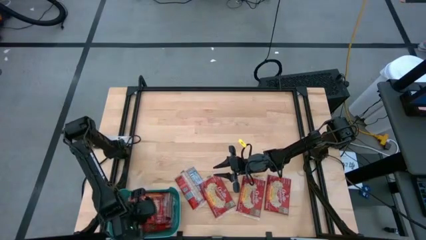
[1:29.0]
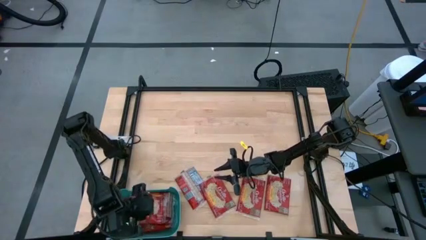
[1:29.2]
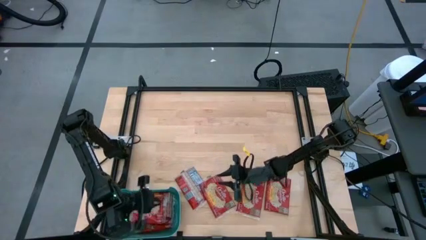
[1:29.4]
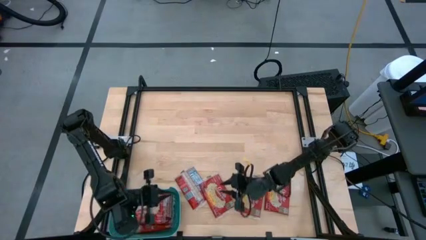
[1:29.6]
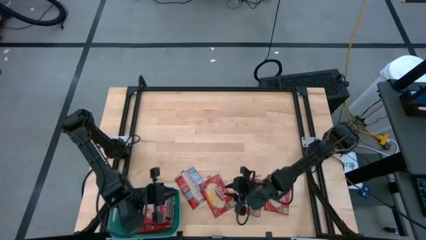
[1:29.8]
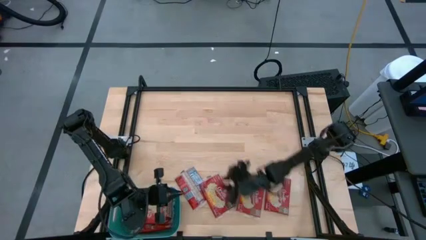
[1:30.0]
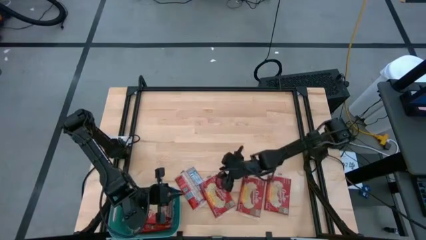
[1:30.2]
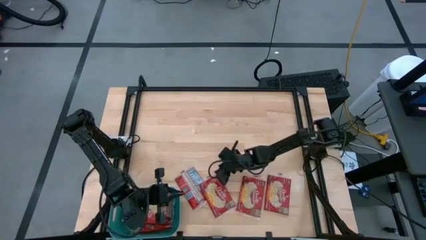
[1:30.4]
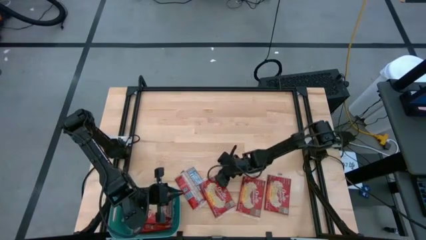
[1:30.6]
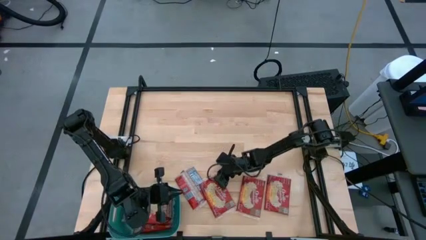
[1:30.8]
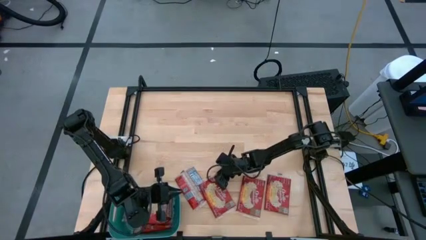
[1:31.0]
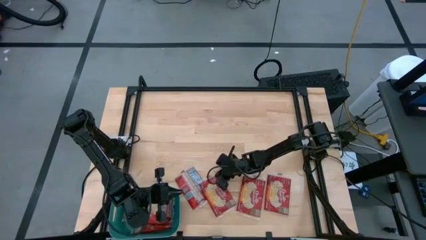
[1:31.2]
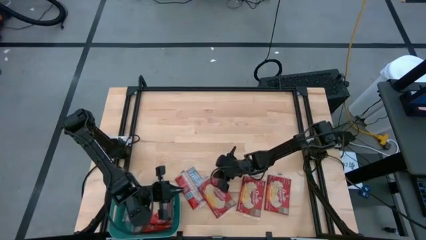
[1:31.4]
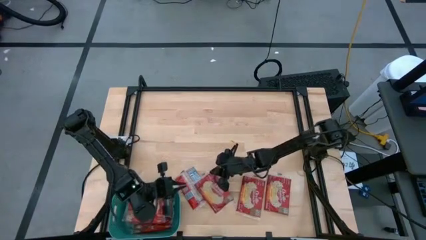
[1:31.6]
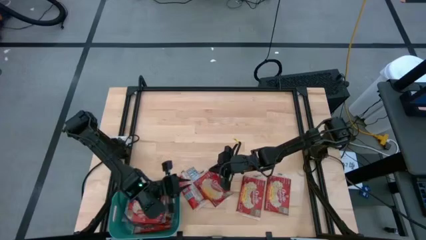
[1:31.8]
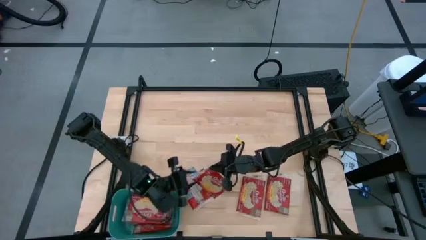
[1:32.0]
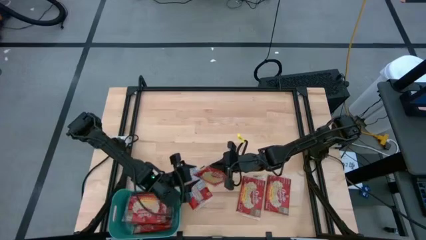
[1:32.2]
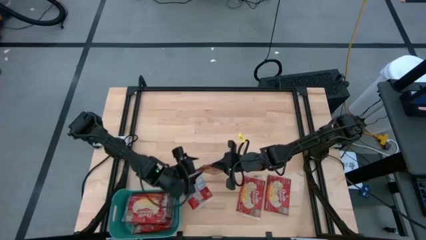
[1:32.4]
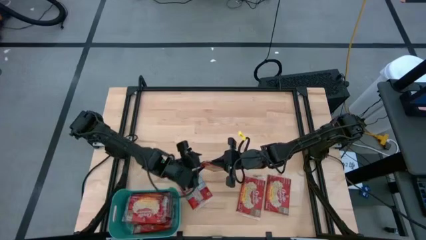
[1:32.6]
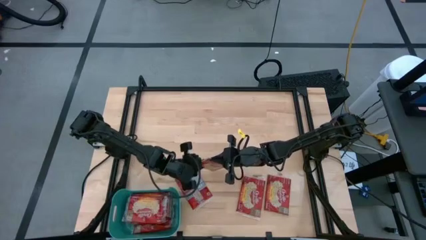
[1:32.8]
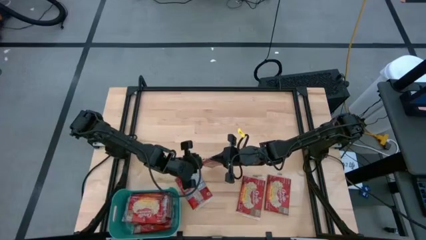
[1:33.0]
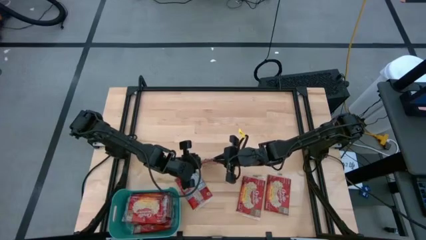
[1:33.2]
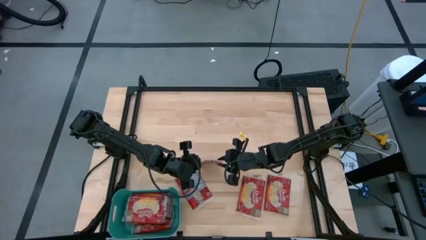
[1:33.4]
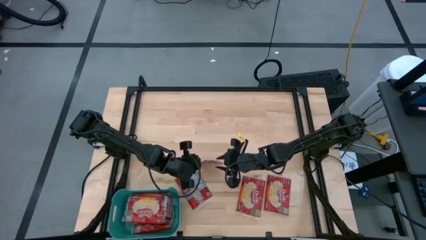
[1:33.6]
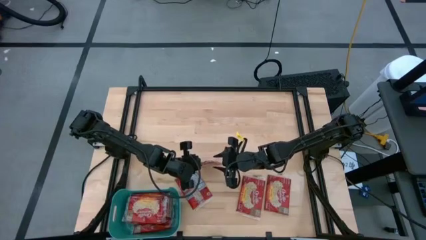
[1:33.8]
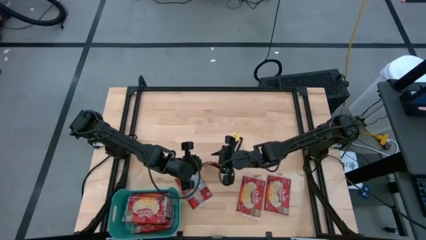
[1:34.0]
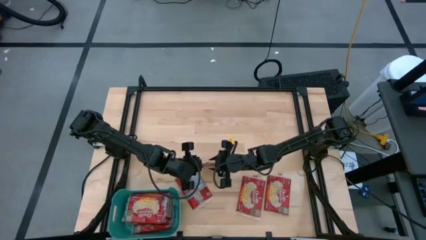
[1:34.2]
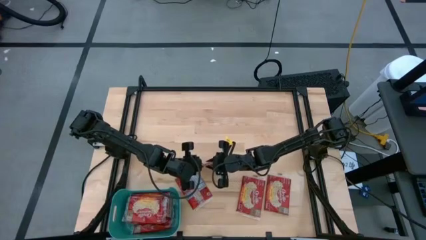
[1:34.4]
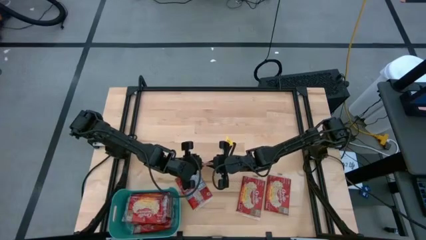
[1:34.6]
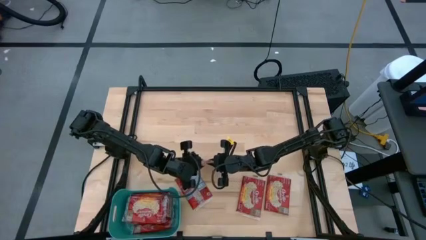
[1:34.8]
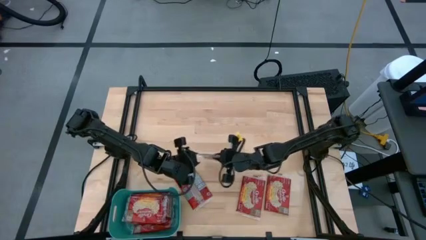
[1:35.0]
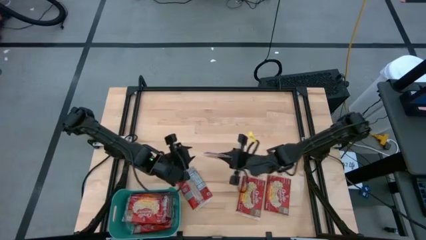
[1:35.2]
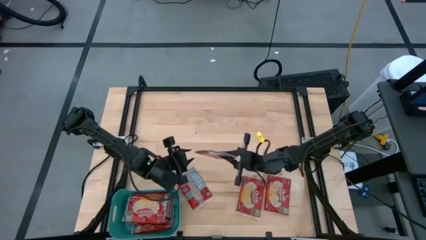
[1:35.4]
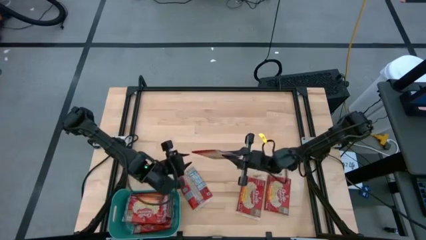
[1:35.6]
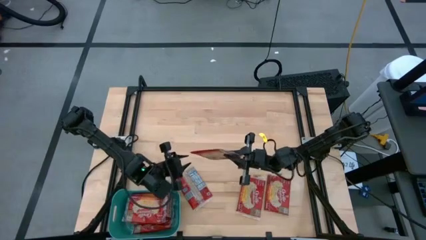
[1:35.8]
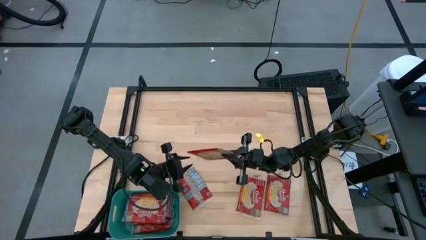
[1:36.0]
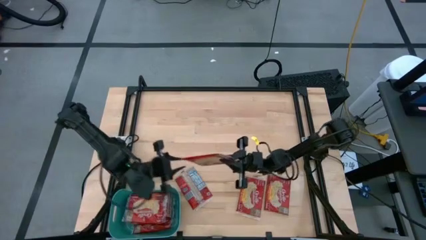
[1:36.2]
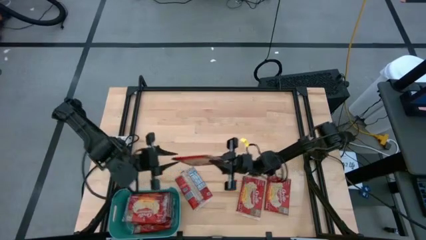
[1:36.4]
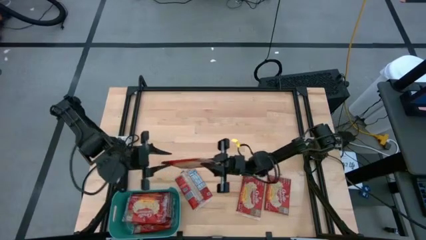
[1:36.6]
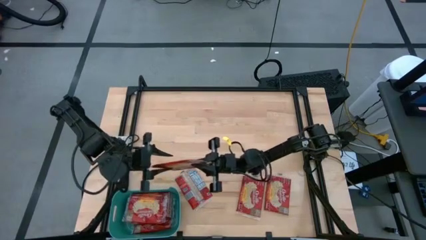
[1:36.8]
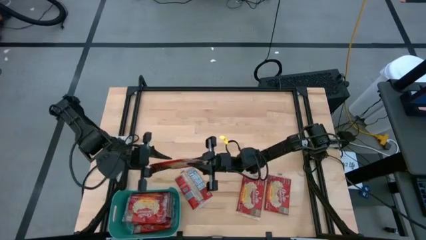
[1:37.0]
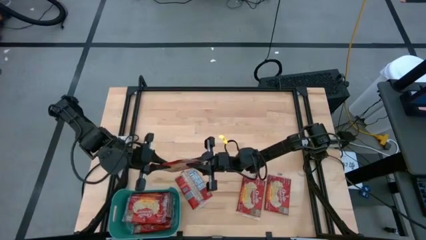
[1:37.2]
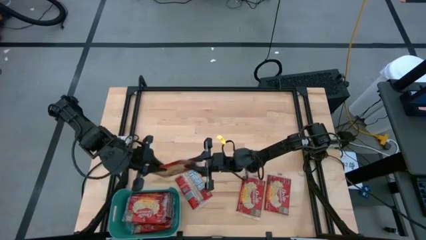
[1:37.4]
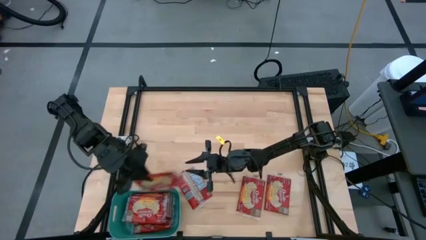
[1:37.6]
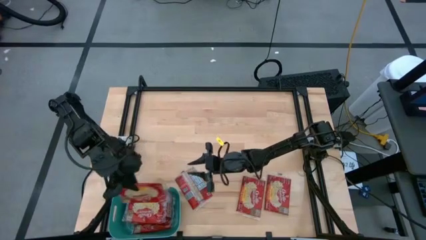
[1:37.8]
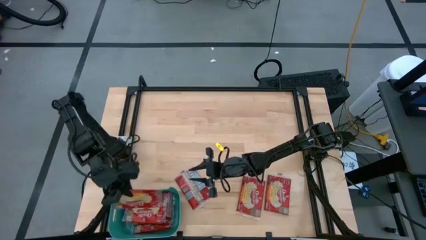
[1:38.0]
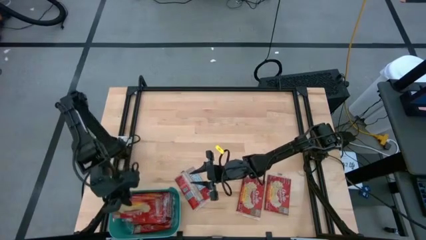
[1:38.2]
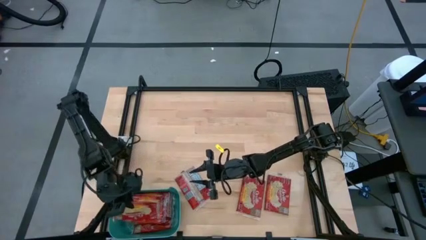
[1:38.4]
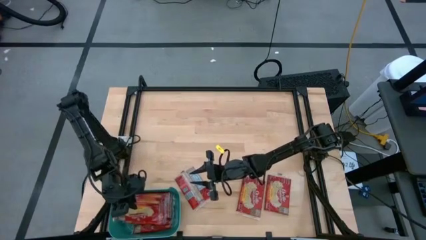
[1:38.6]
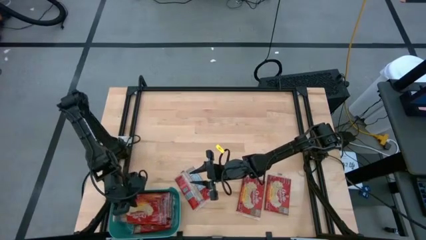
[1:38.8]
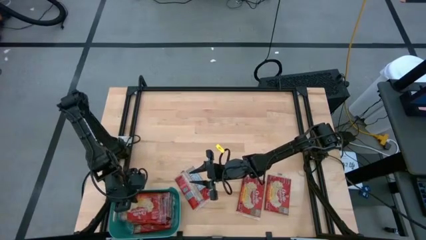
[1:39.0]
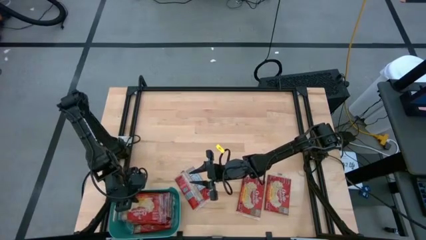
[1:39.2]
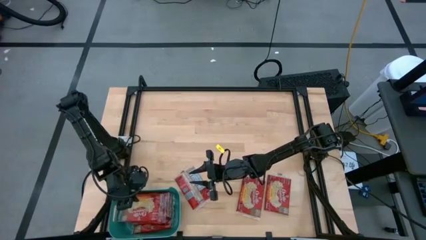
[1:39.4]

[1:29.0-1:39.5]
Task: Sort popcorn bags into baskets
Put the red popcorn bag into the blue container

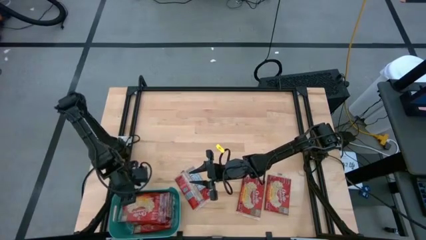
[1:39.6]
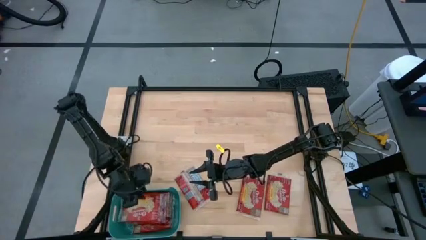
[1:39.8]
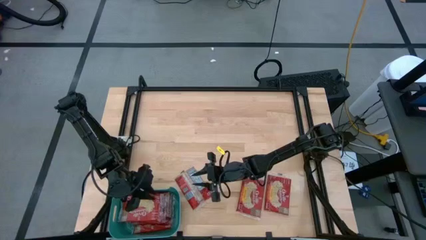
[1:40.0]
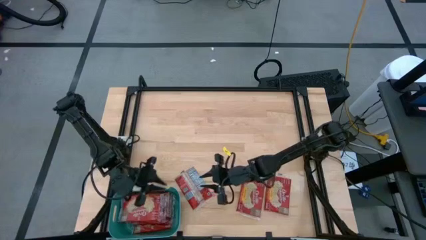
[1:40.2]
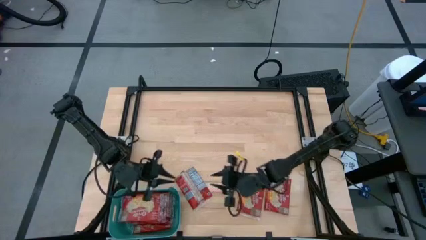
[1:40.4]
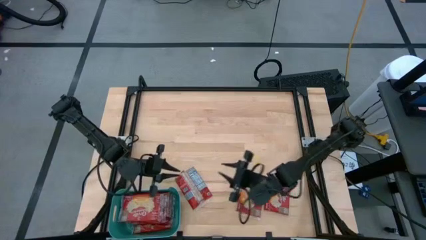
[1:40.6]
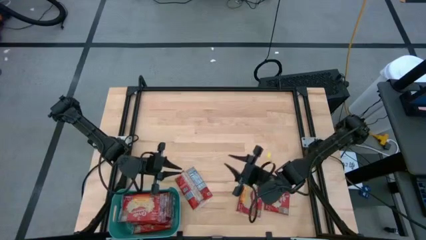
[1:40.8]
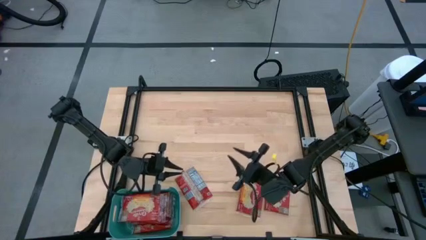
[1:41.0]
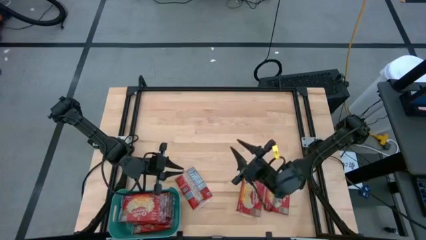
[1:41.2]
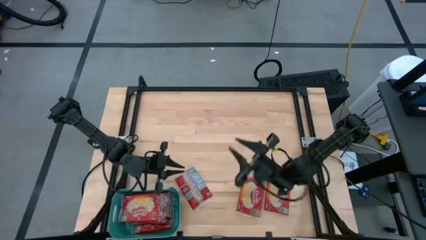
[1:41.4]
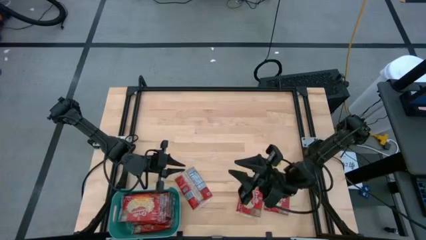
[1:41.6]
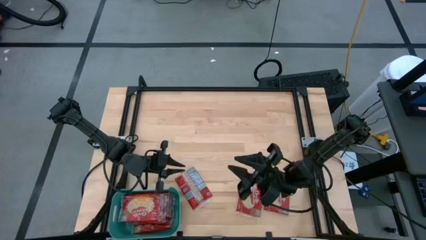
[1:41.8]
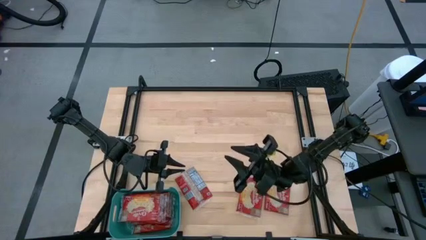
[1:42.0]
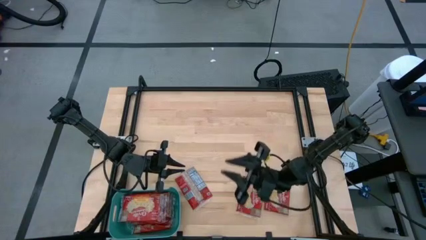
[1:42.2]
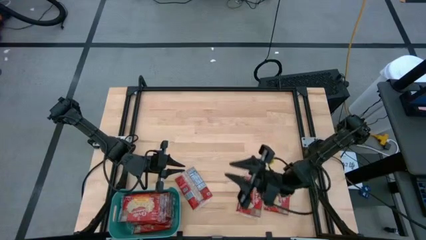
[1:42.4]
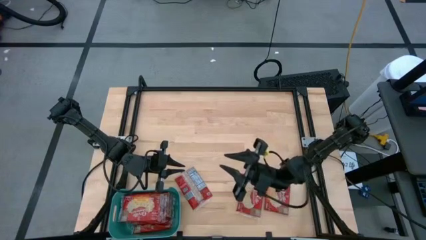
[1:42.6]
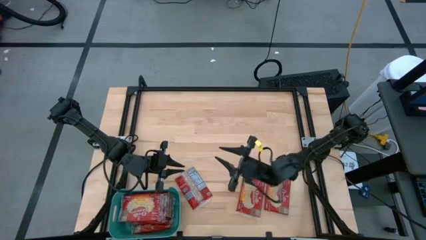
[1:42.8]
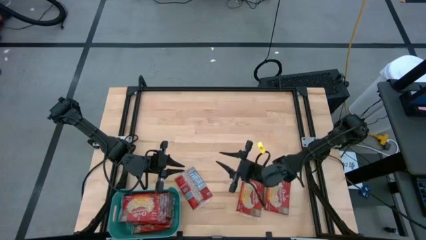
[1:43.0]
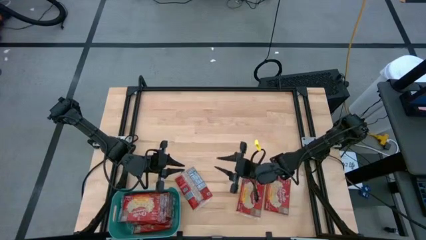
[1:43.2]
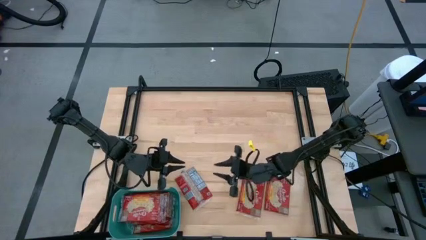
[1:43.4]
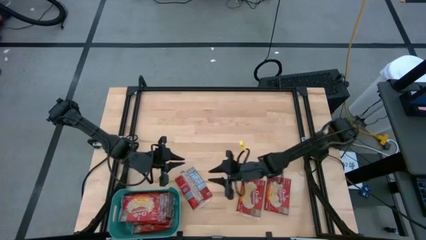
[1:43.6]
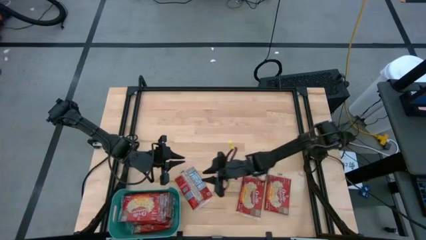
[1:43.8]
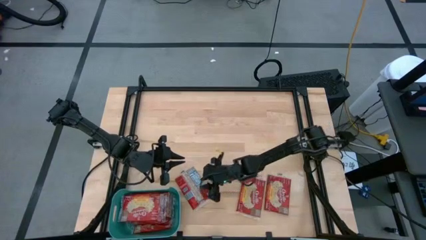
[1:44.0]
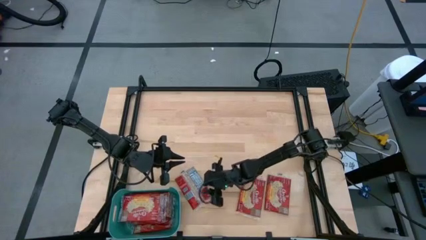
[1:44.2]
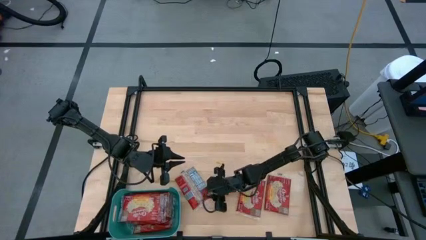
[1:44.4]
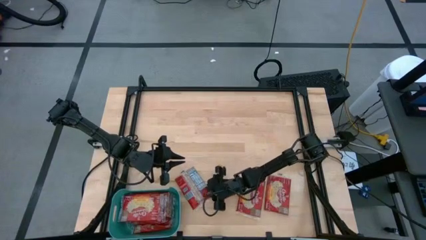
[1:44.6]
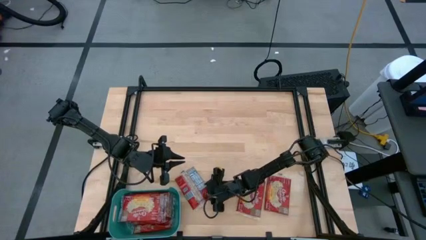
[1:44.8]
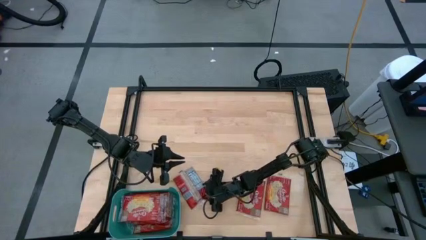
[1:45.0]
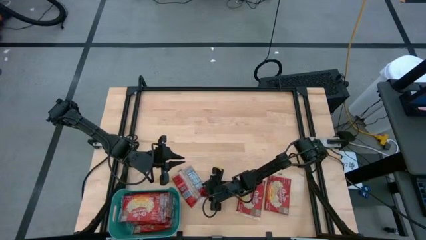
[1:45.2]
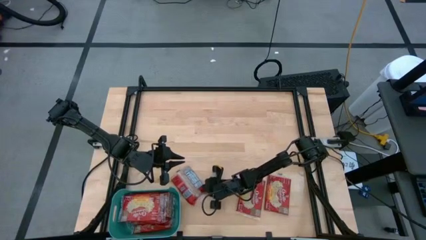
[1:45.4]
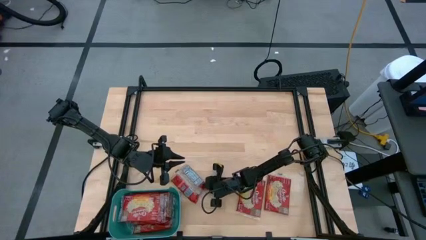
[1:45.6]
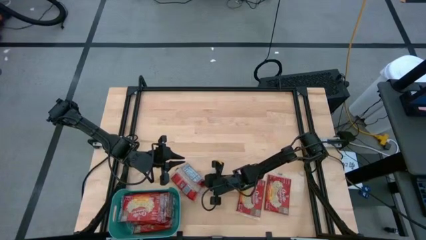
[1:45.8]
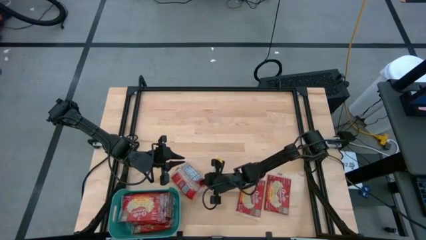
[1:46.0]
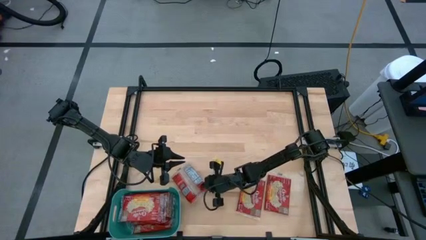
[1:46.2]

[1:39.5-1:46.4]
Put the red popcorn bag into the blue container
